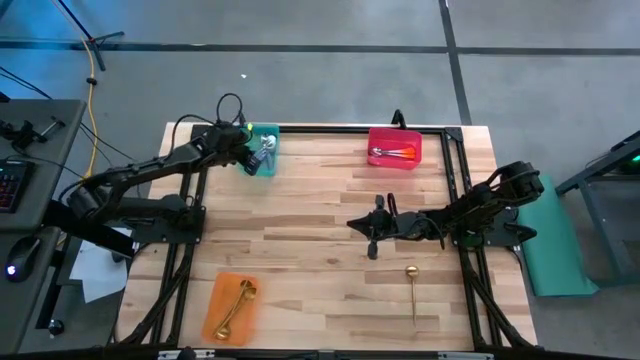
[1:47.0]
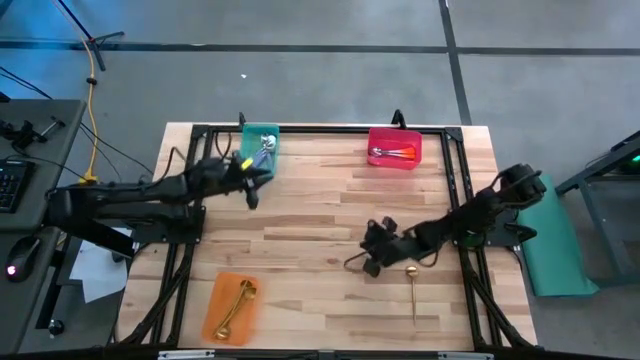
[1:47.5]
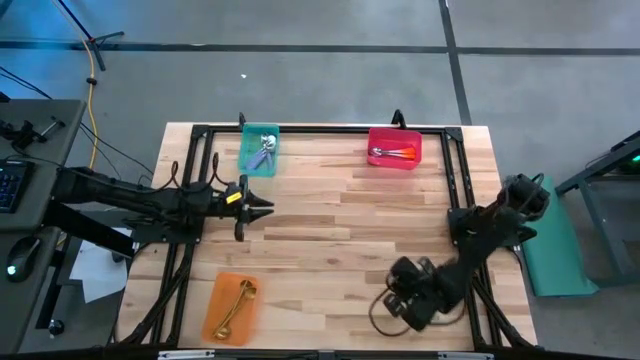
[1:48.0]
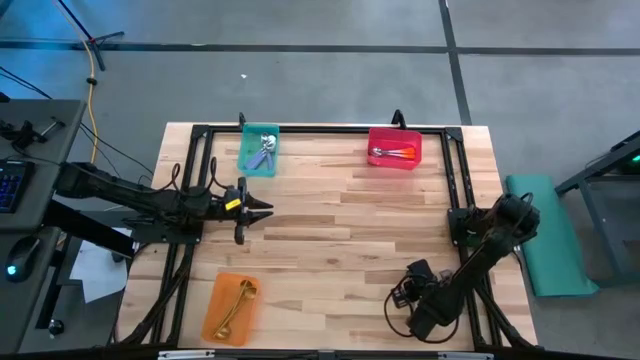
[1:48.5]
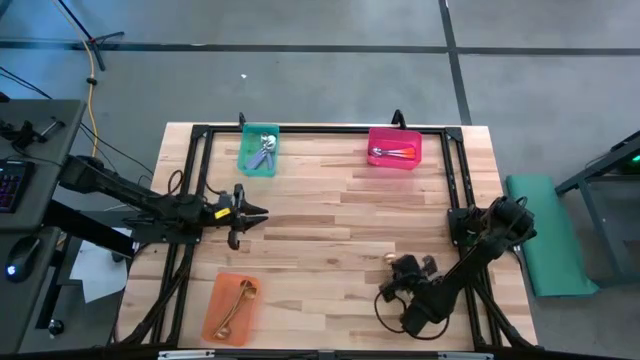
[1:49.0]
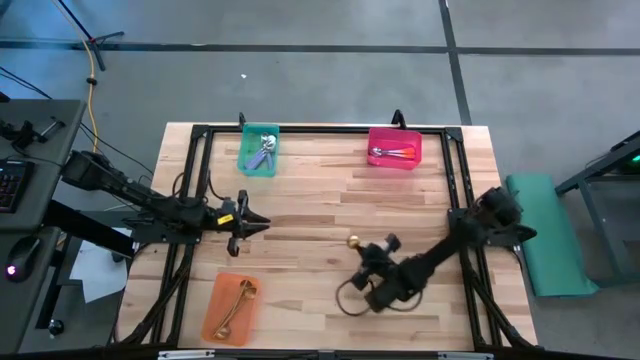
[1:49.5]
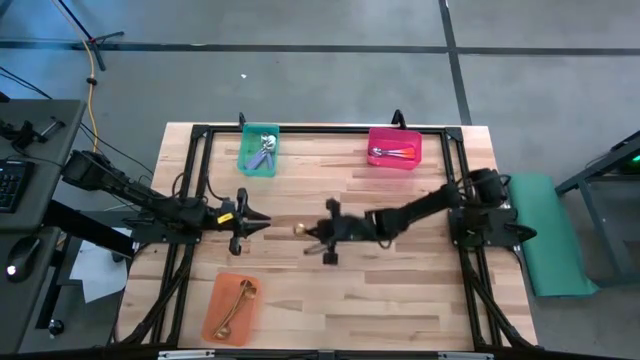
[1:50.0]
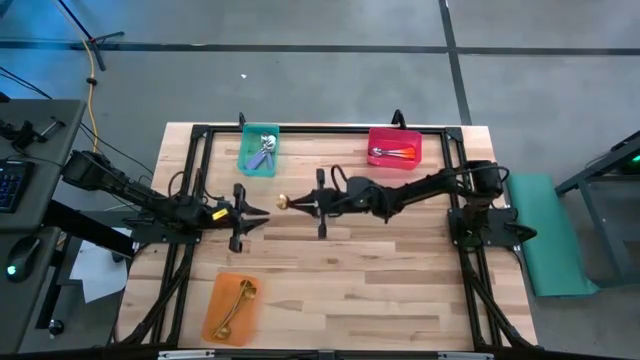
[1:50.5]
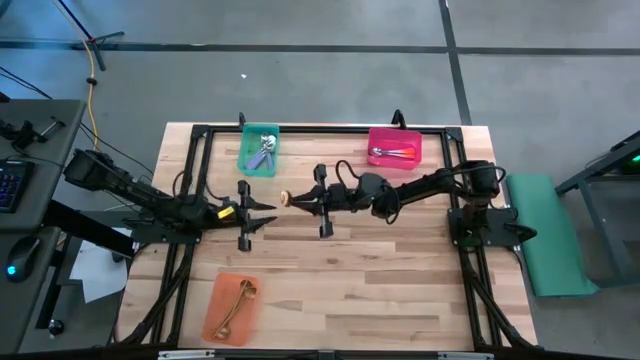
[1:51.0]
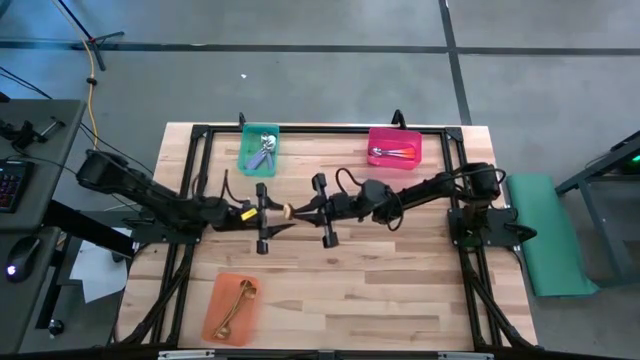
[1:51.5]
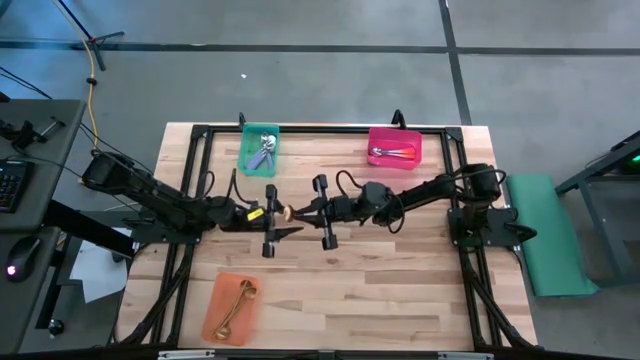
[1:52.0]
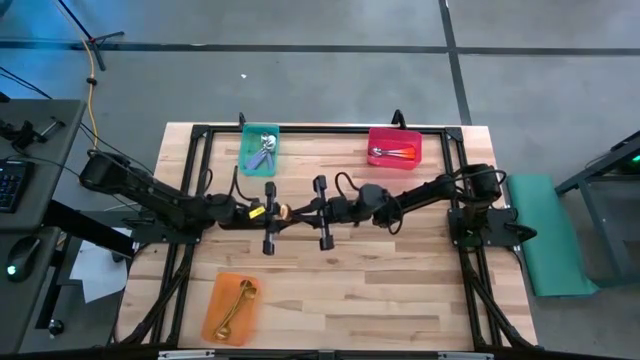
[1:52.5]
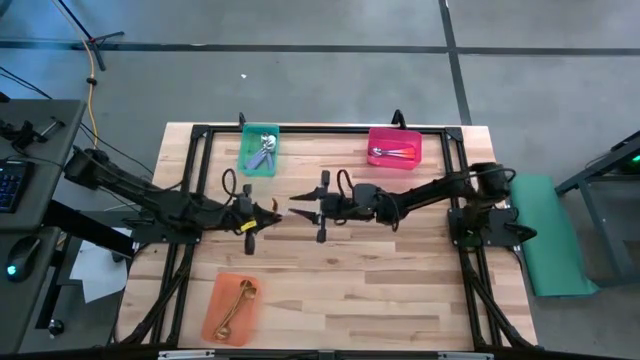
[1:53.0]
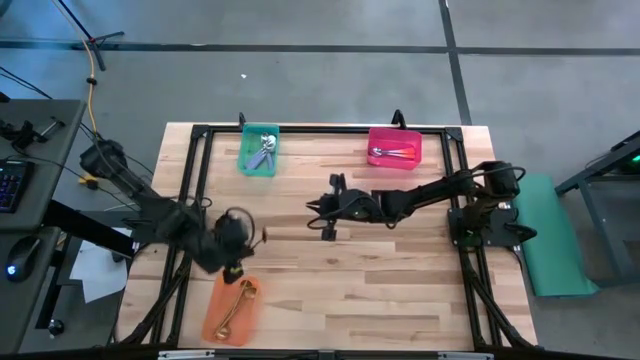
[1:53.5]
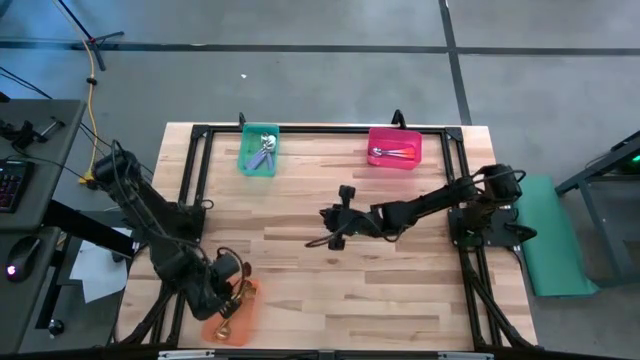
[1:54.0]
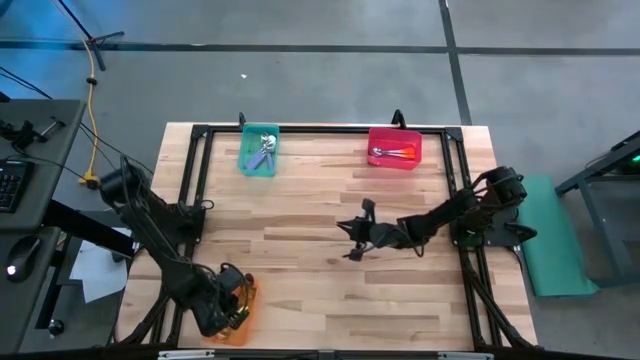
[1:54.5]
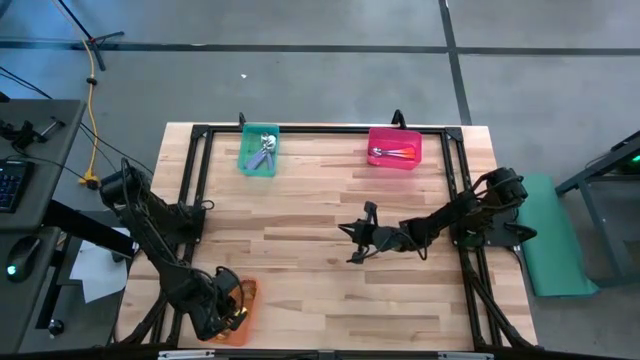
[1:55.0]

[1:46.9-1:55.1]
Task: Sort silverware by color (type)
Put the gold spoon into the orange bin

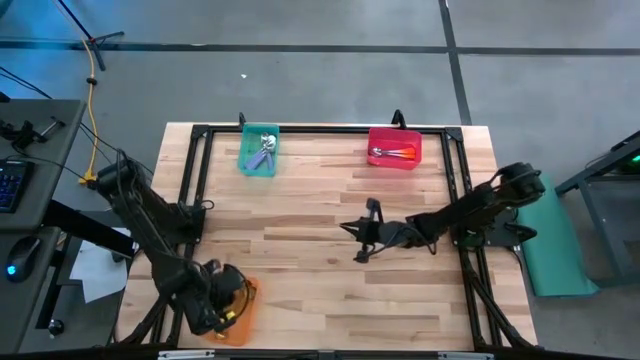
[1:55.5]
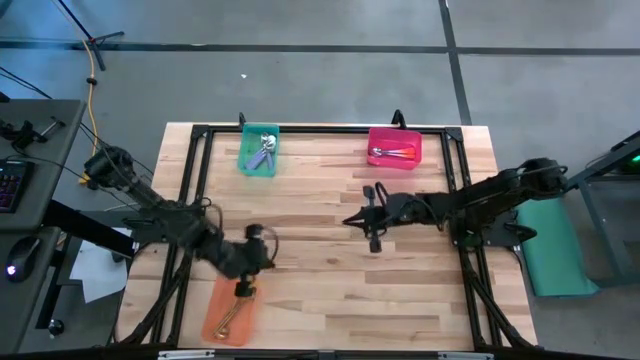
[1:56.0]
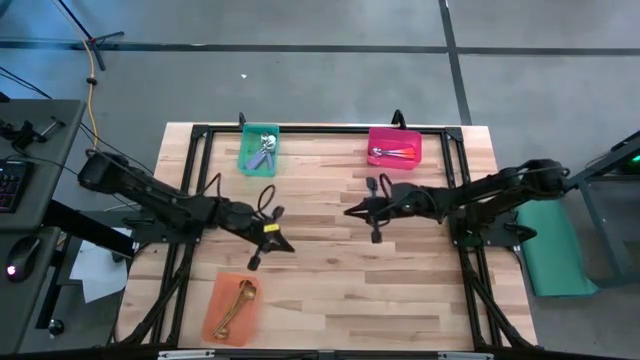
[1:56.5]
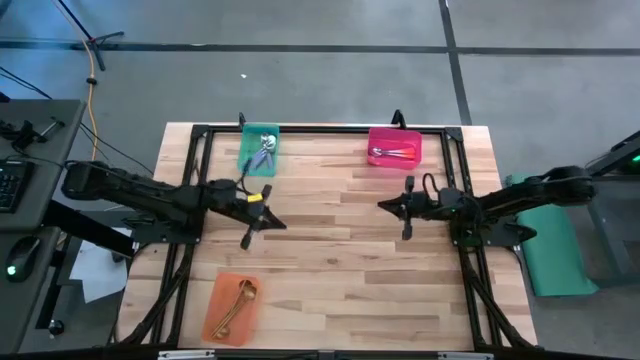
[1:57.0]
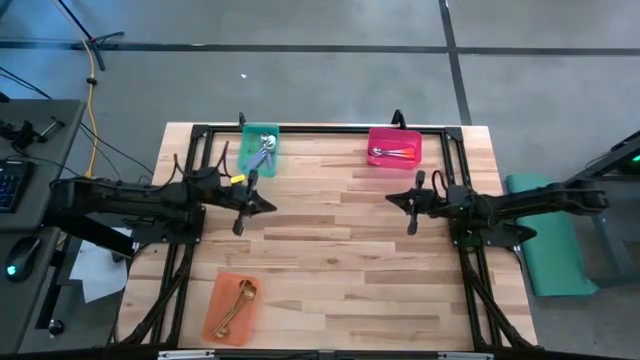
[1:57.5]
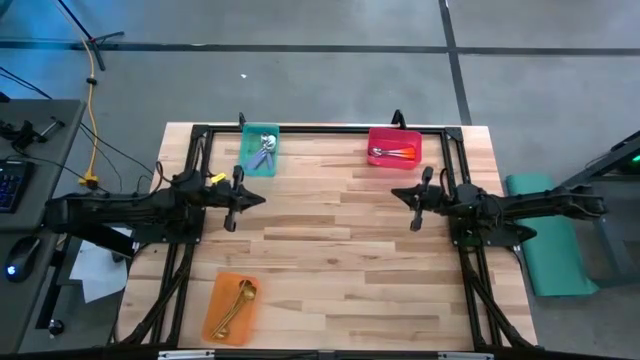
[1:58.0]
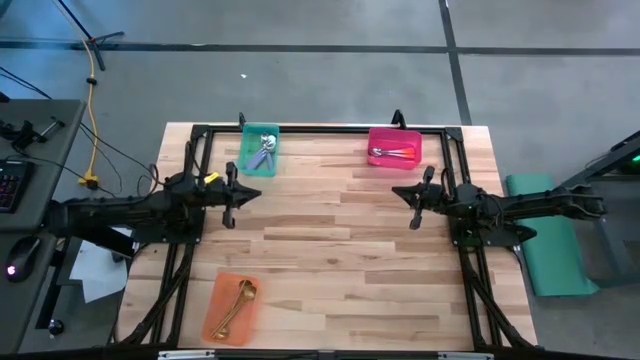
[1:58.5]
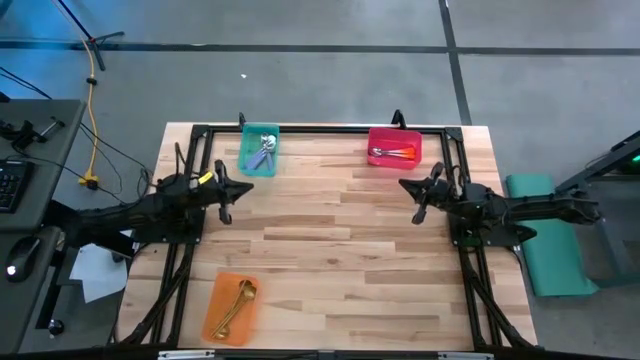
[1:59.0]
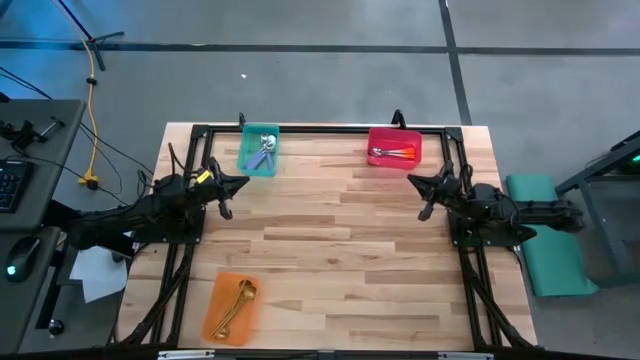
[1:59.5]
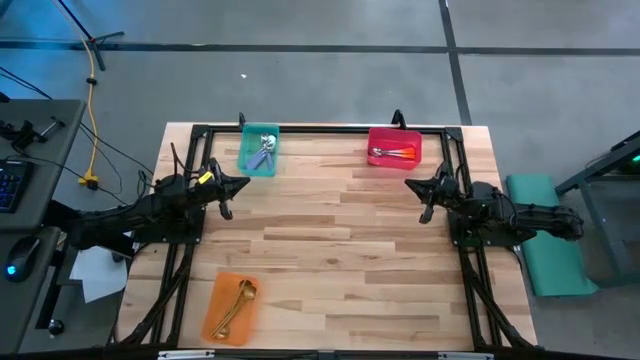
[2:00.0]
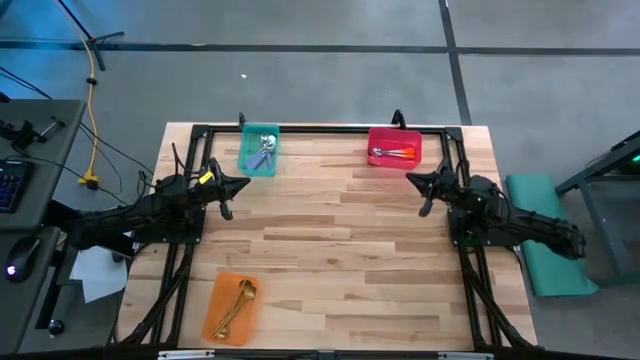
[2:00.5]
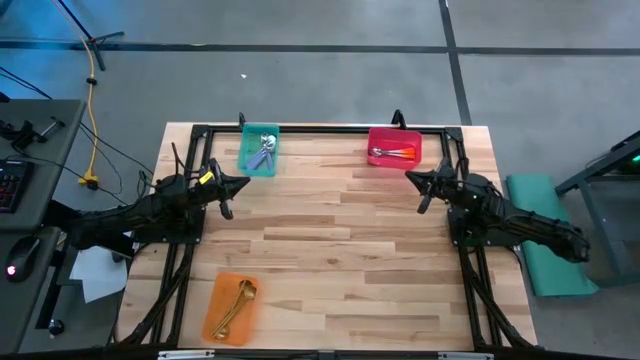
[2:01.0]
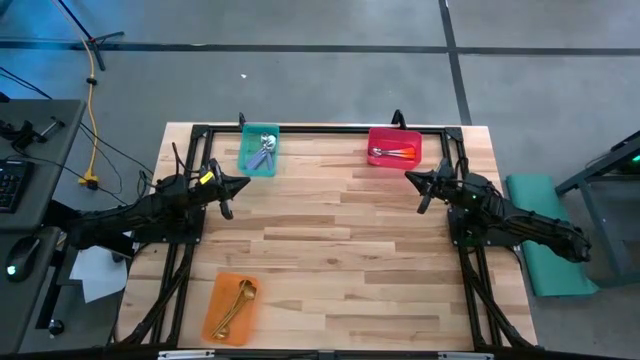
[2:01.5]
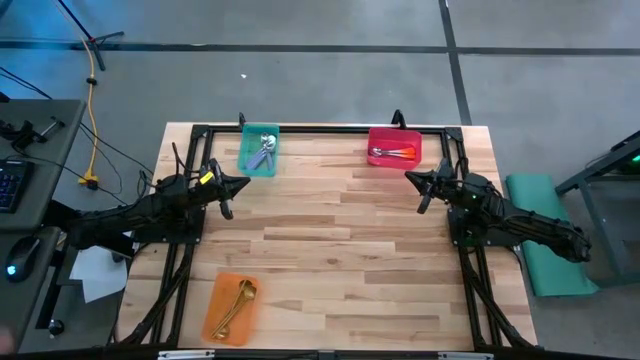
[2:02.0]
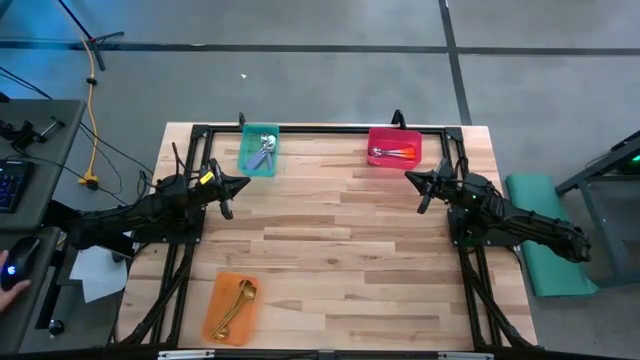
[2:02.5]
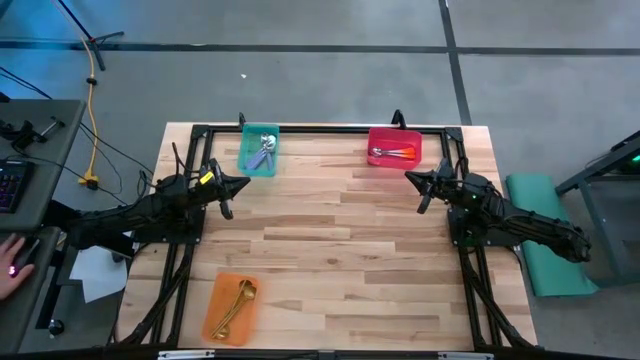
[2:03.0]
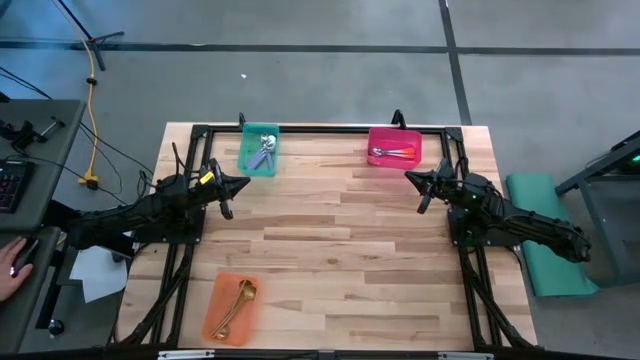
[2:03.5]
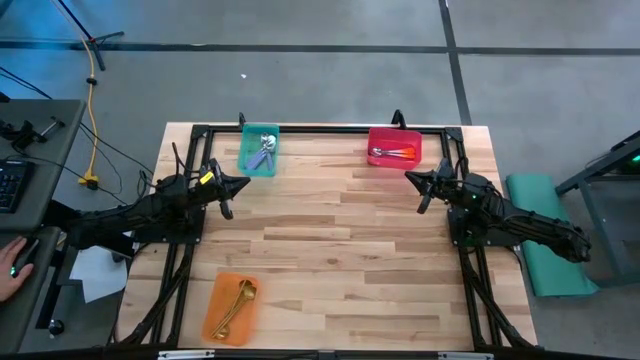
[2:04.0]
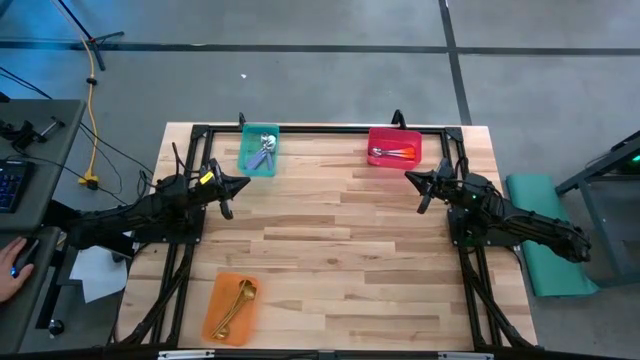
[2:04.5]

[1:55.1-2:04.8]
Return to Home Position

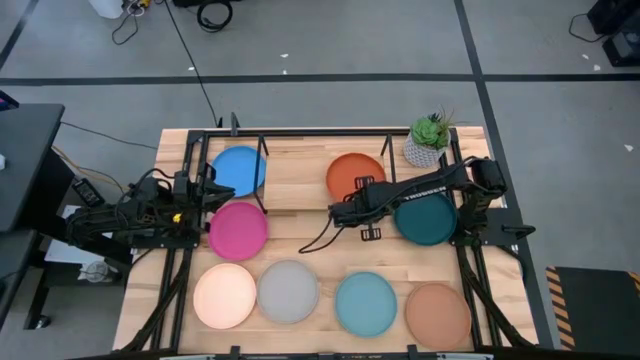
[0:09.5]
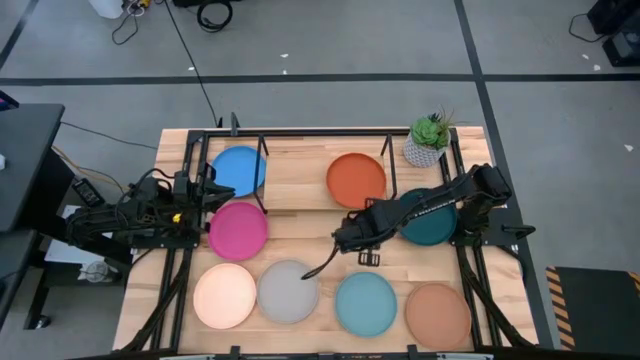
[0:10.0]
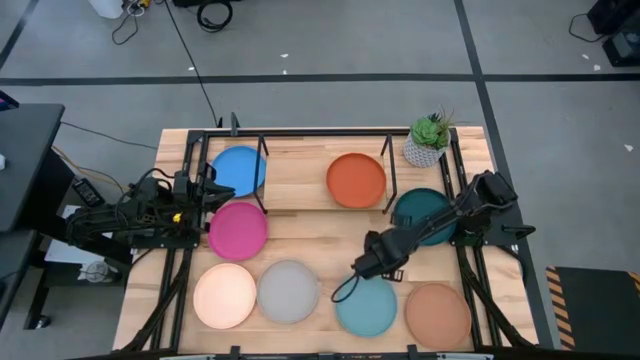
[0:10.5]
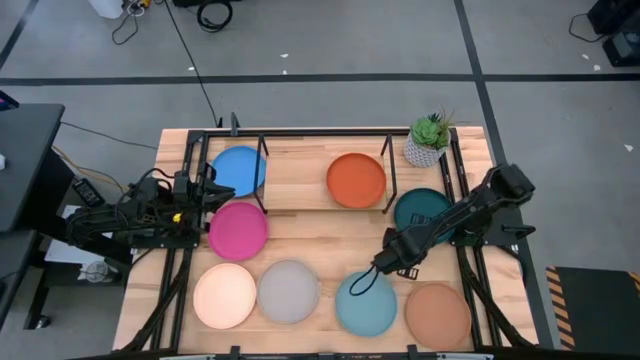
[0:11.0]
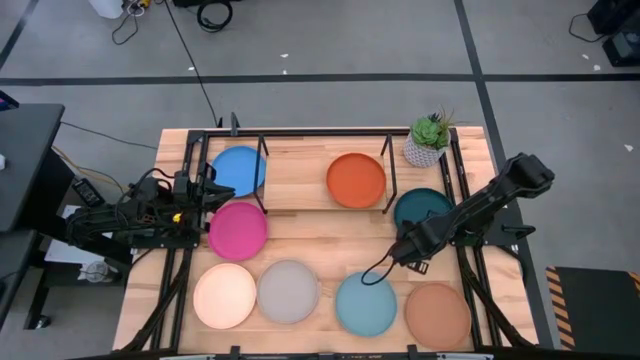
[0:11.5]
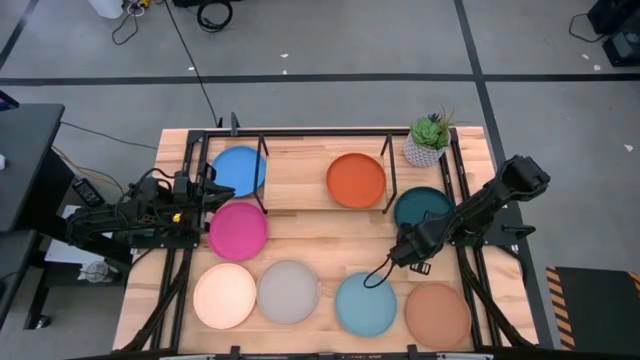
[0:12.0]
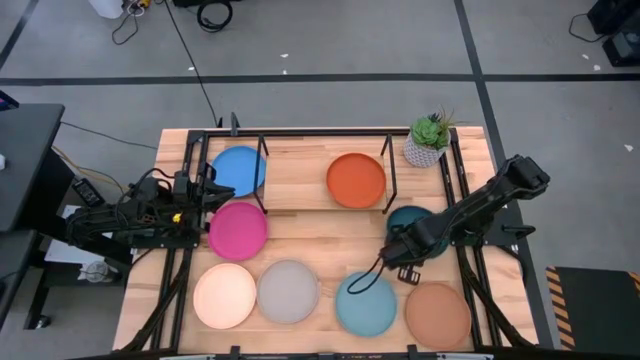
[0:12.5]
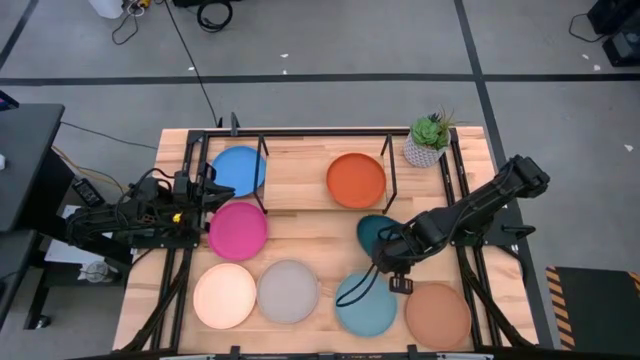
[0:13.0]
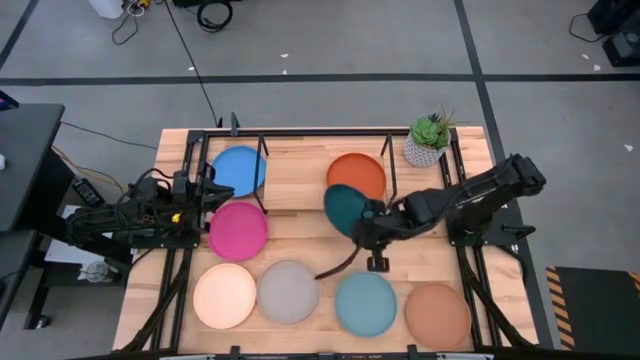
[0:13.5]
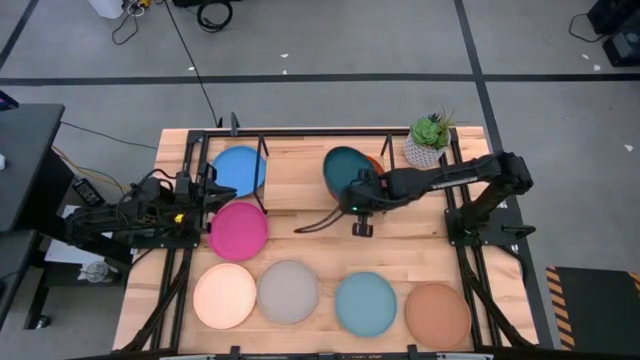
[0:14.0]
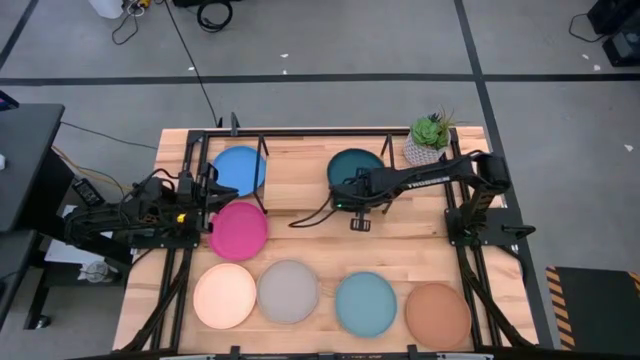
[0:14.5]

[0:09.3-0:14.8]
Task: Place and stack plates onto a shelf
Stack the dark green plate on top of the orange plate on the shelf
